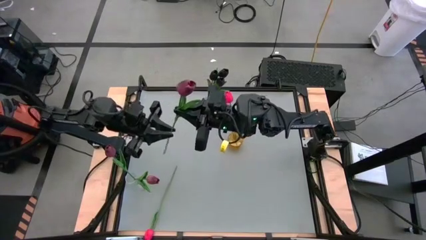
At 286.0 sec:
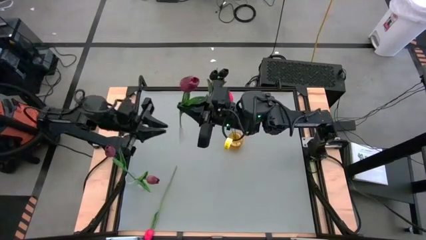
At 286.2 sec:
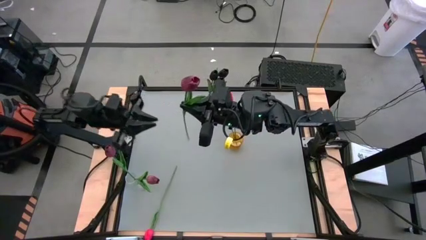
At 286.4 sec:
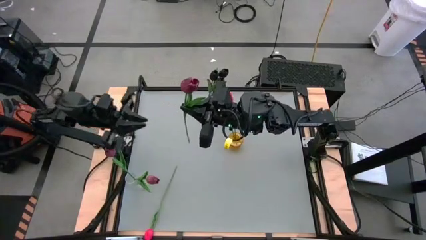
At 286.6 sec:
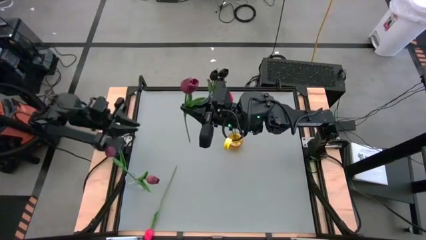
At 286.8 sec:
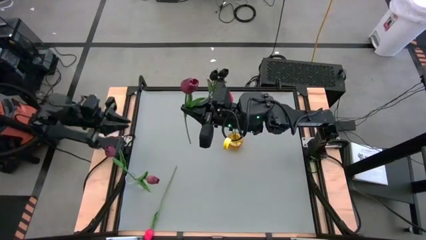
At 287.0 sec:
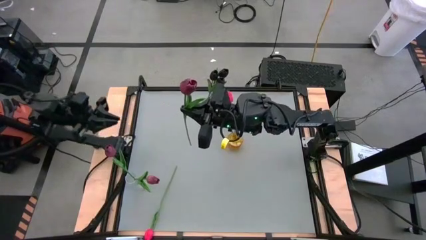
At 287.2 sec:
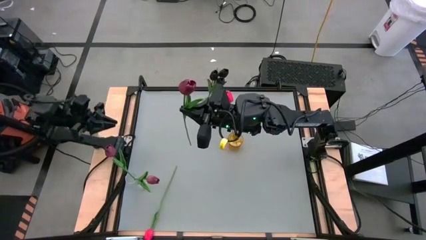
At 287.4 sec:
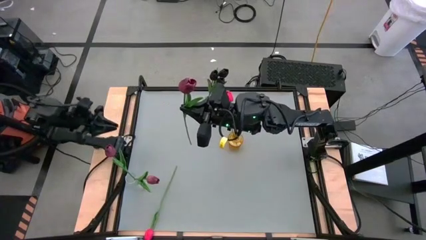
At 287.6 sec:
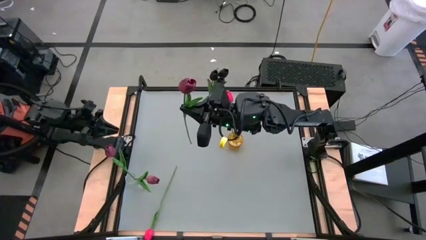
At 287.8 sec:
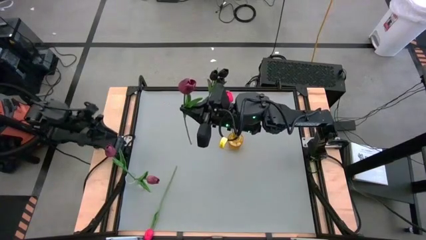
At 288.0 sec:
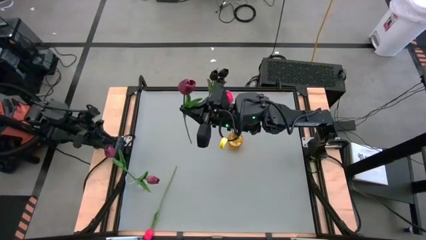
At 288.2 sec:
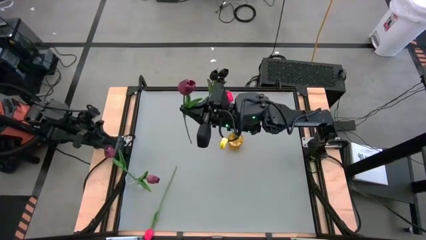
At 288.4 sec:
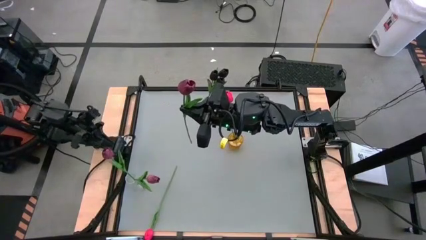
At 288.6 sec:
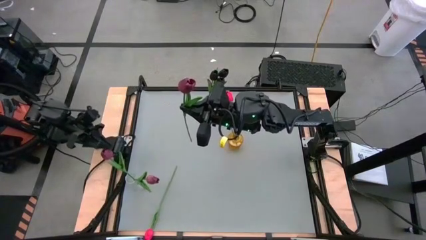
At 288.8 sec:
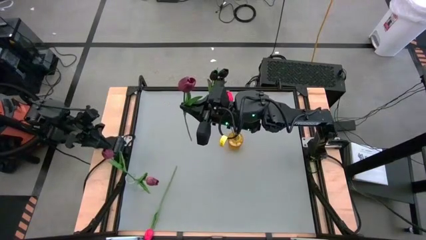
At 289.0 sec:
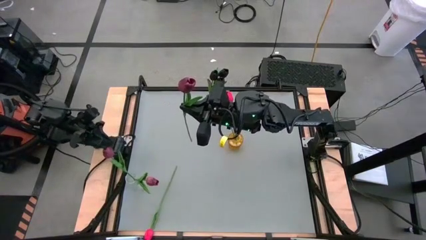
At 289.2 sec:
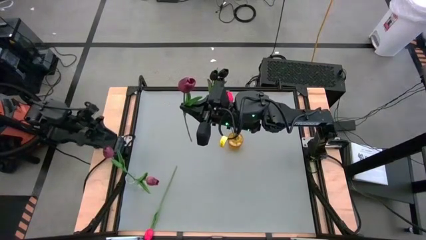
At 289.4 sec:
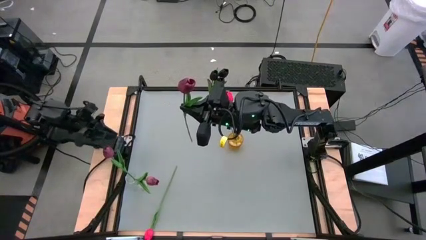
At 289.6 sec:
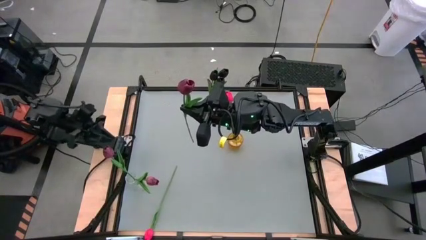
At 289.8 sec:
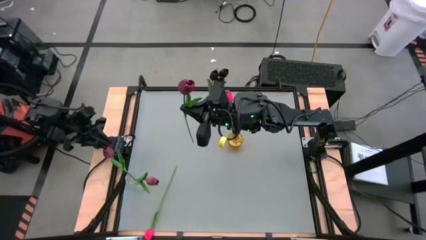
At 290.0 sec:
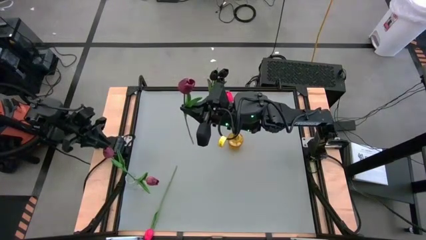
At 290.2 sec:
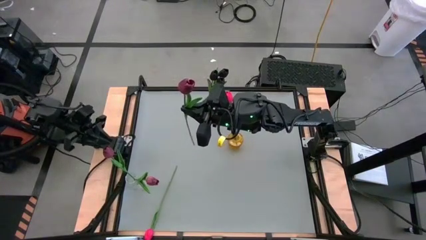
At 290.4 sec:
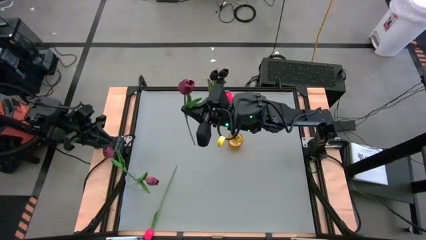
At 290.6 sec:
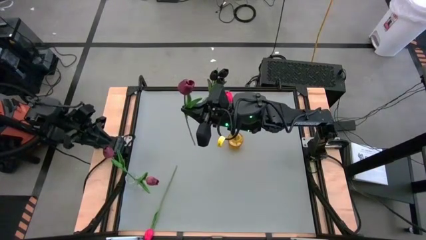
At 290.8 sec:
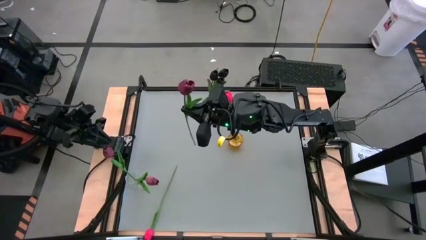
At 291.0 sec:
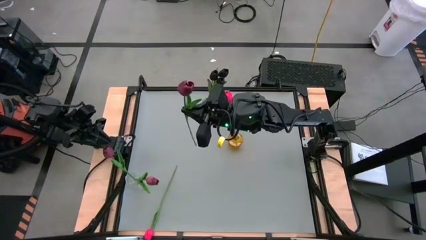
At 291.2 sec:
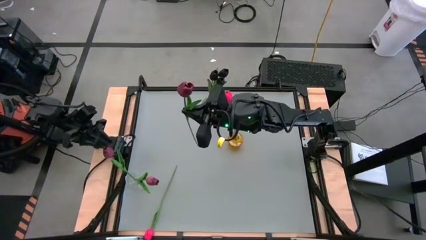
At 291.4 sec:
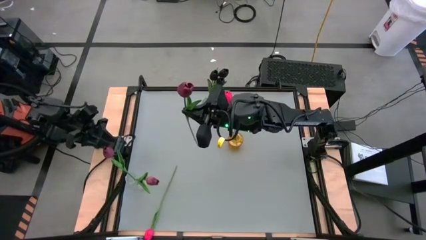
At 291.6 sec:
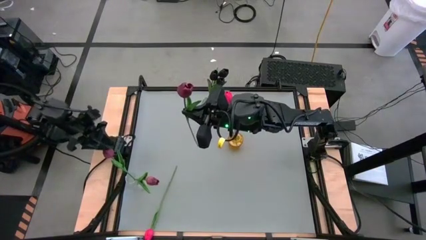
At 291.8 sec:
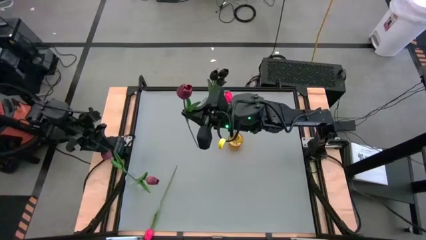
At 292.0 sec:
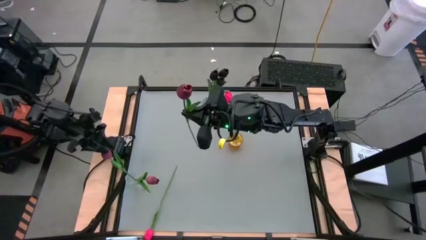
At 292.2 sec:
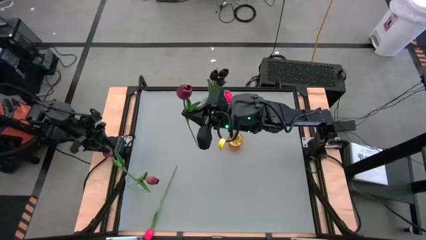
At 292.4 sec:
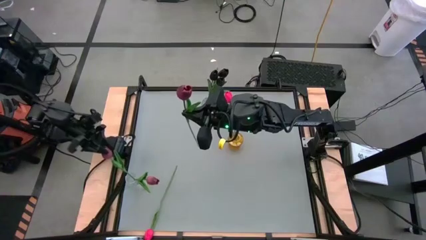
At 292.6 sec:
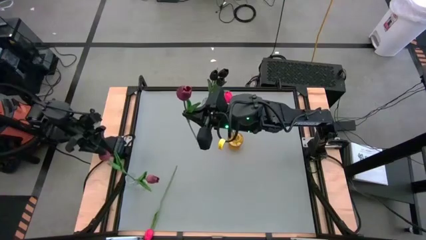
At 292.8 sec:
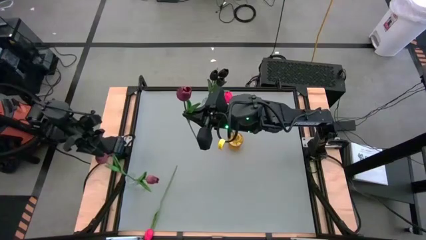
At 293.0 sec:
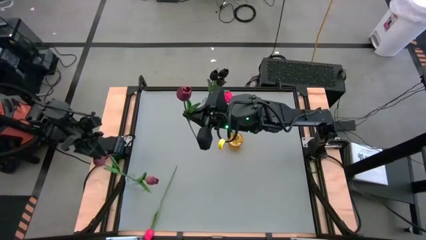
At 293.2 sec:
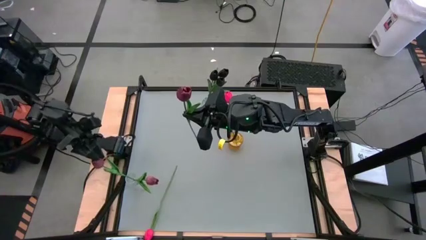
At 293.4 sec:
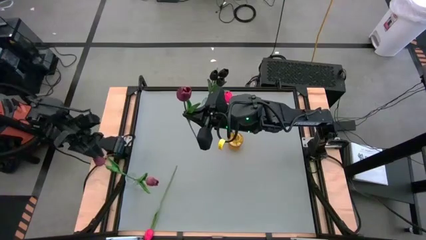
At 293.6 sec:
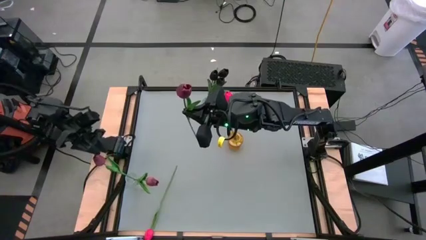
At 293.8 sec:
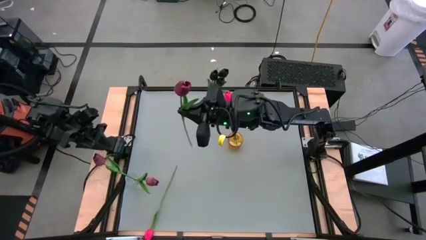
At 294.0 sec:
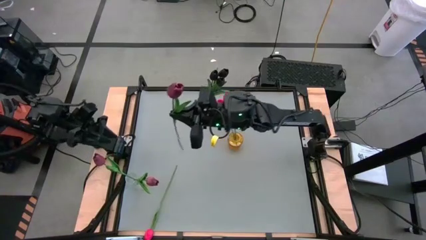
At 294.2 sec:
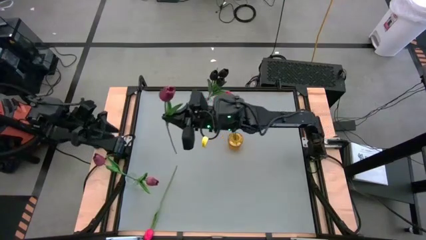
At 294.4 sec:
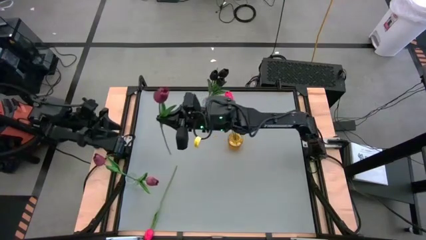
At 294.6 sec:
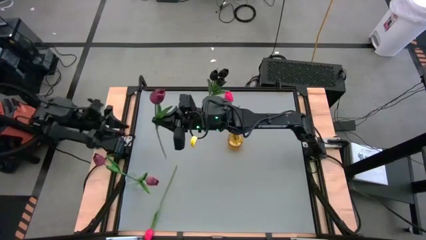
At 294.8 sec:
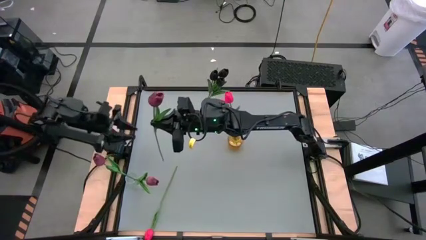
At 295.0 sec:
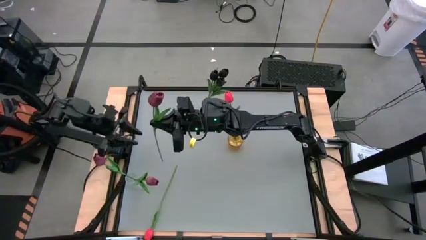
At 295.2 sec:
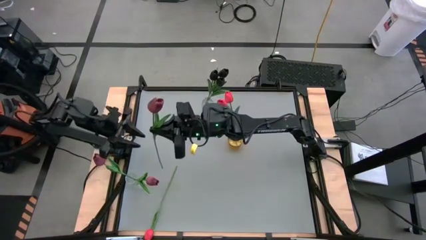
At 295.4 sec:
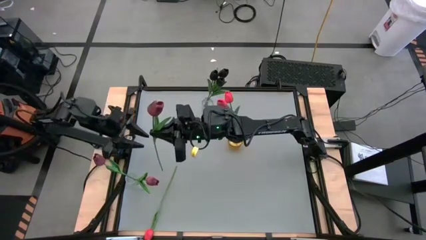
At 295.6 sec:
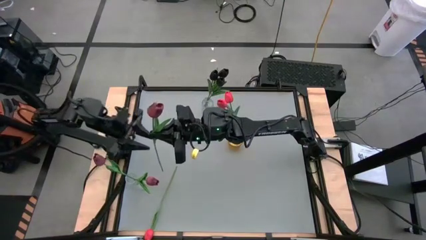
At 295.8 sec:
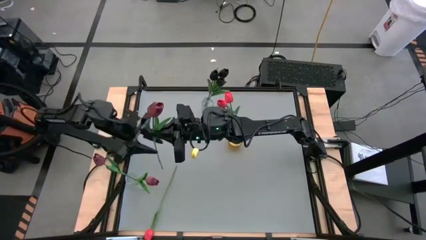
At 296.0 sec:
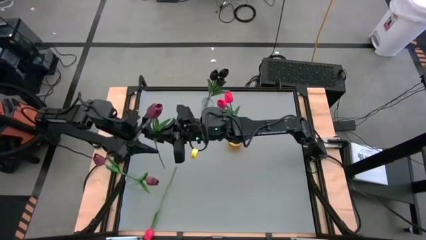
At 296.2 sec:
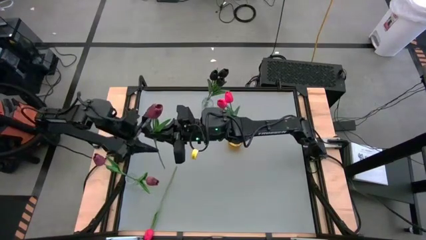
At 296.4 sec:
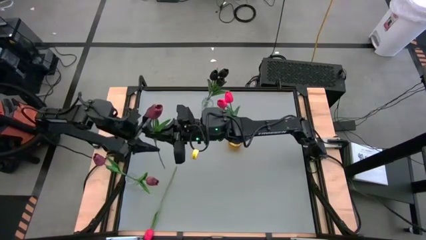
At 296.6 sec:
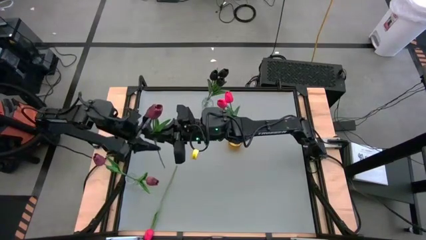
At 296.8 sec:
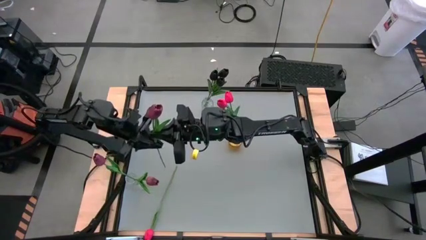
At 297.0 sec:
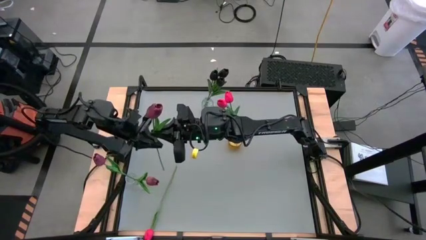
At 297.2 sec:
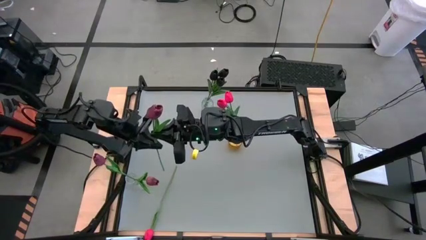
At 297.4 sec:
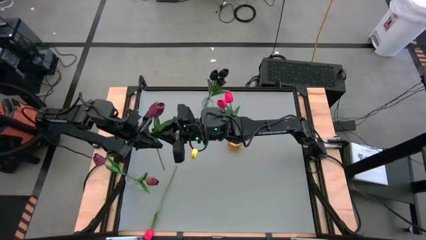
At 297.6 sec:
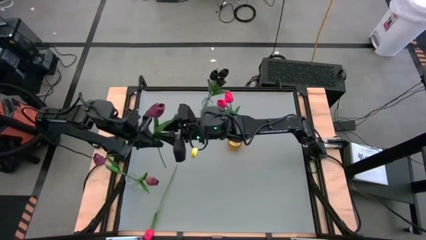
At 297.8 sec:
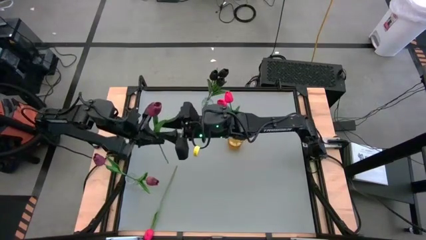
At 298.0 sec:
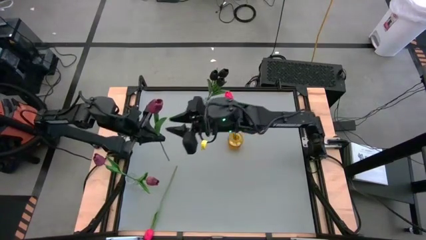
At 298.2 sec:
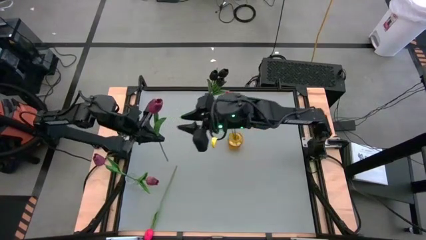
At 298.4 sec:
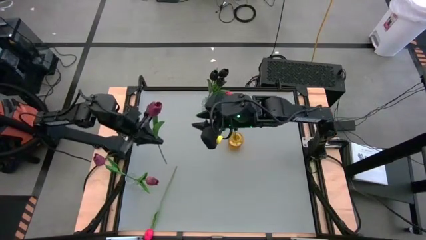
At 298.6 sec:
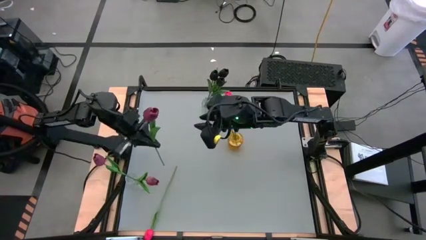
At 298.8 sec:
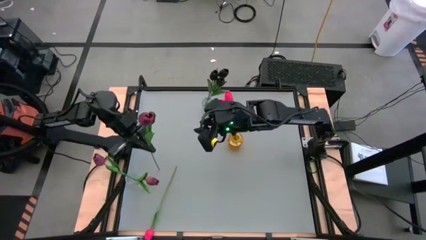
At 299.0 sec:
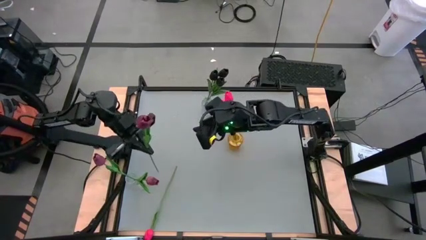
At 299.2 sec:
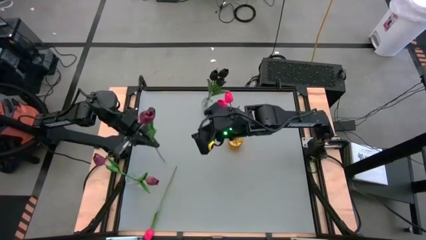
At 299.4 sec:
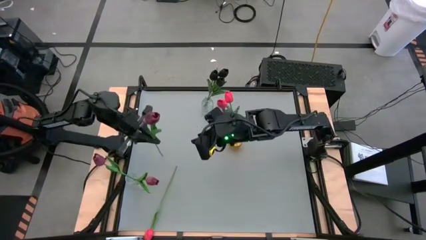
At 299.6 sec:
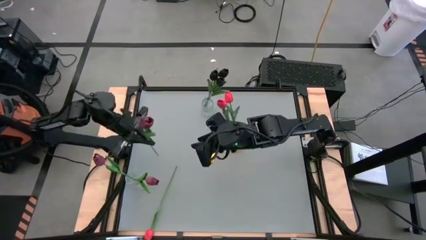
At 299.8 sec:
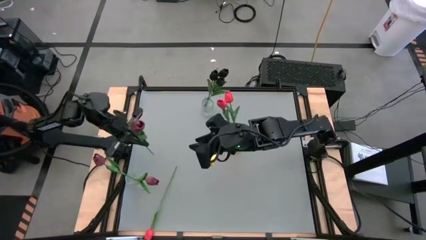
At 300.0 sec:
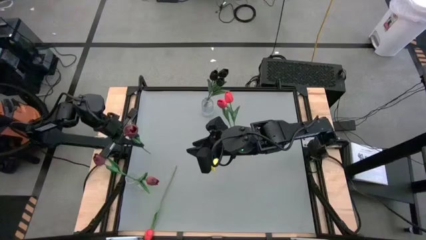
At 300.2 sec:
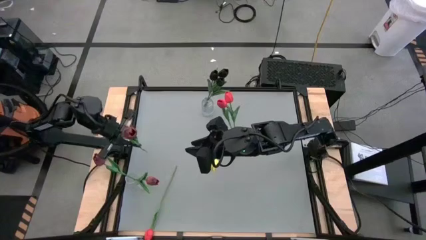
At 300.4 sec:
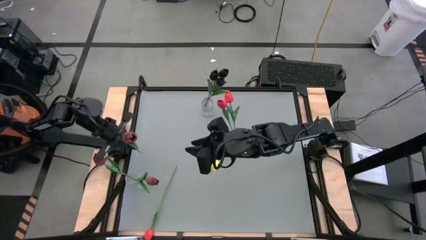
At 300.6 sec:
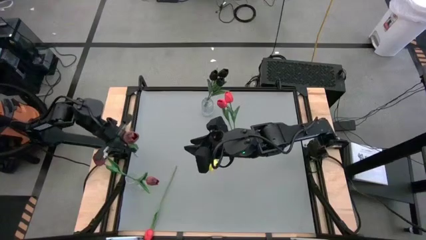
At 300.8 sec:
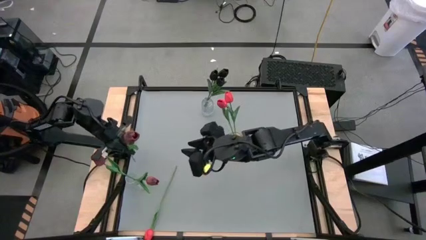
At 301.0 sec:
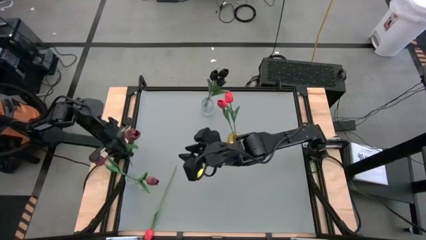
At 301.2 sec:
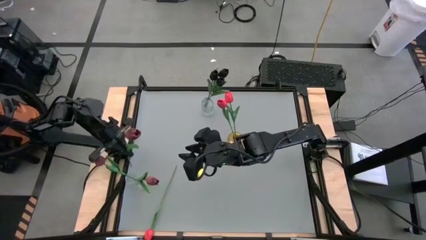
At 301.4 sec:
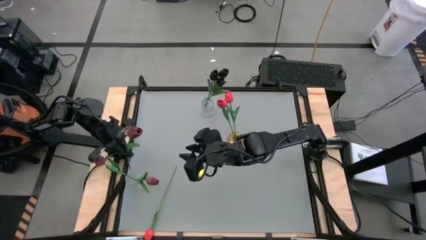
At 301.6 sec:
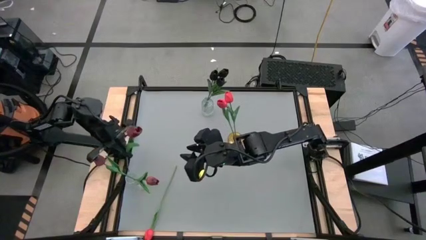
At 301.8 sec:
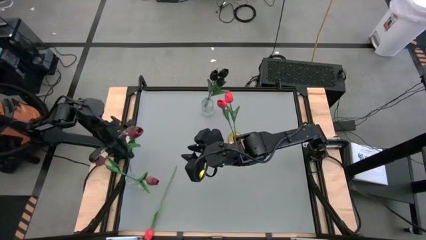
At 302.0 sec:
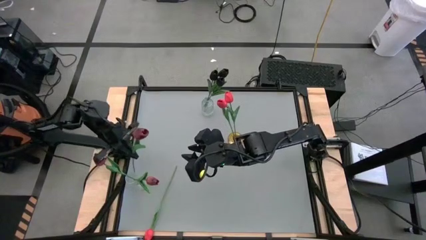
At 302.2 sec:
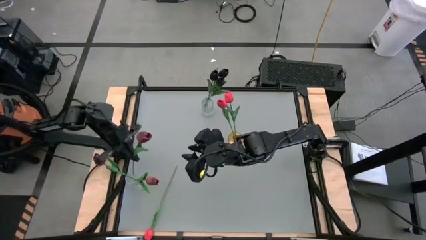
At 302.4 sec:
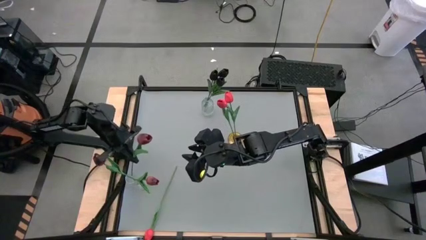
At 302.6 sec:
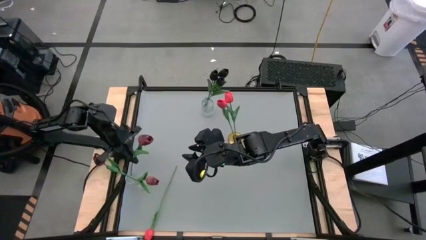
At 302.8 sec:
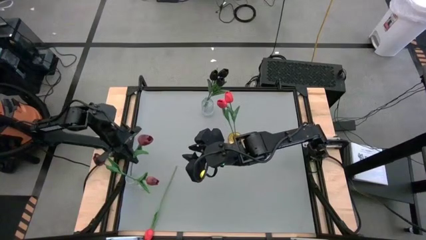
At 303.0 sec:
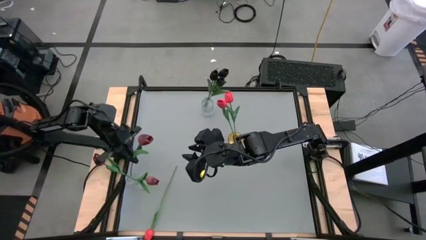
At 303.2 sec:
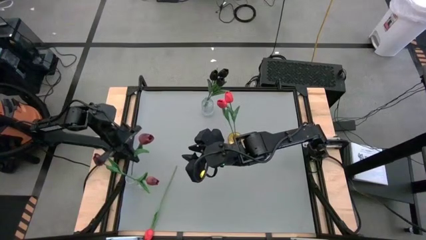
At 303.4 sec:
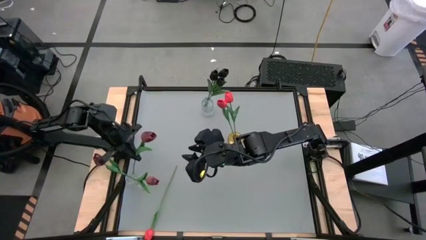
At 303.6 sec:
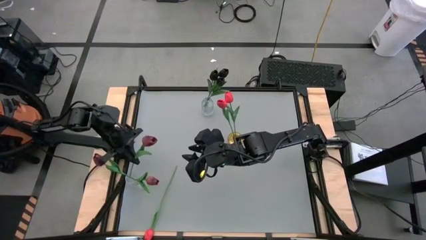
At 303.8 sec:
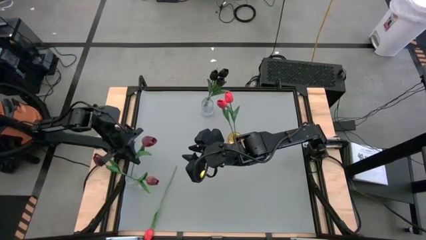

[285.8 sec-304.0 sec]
Task: Sort flowers into vase by color
Put the red tulip into the bottom transparent bin
